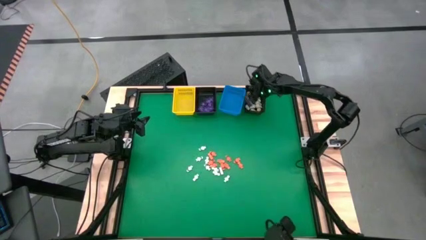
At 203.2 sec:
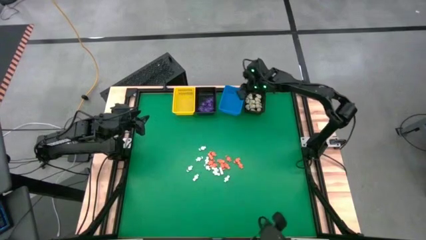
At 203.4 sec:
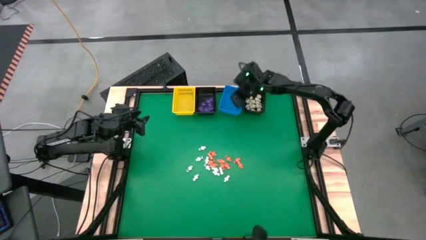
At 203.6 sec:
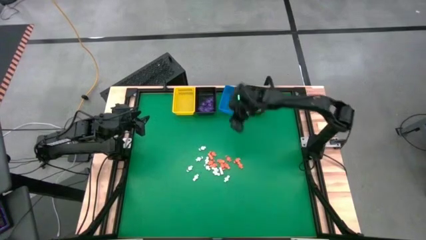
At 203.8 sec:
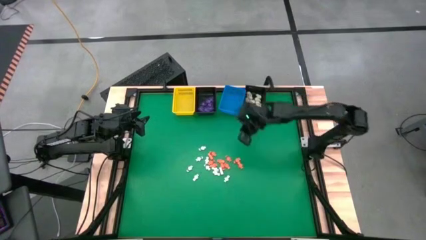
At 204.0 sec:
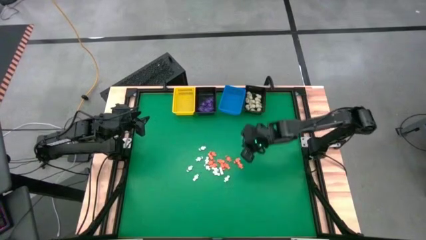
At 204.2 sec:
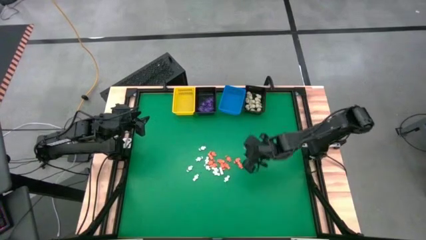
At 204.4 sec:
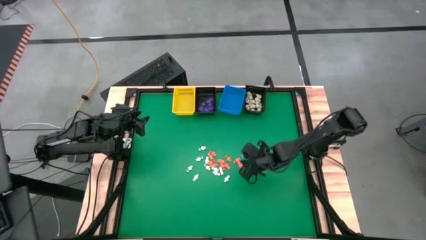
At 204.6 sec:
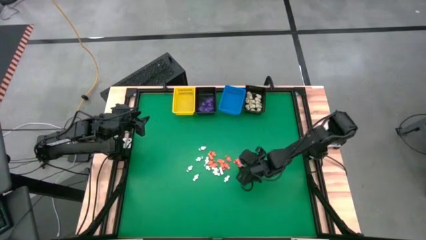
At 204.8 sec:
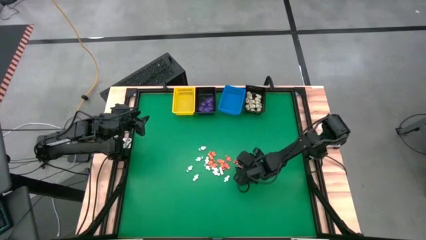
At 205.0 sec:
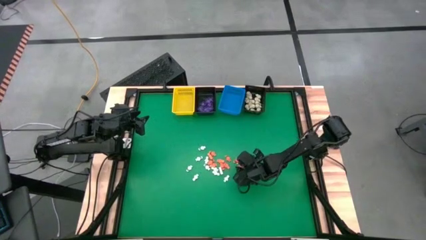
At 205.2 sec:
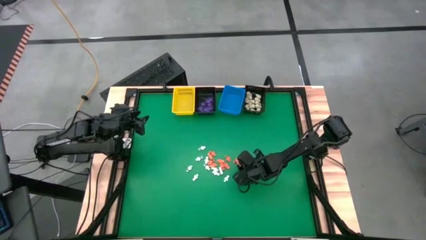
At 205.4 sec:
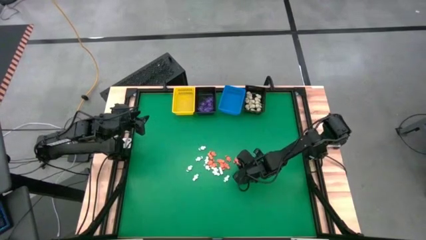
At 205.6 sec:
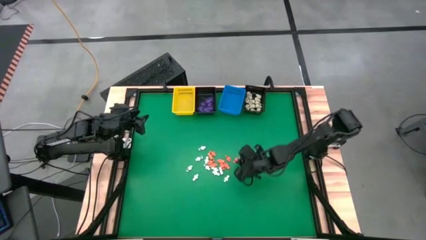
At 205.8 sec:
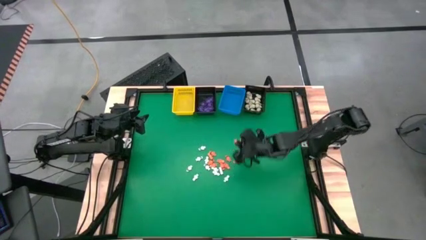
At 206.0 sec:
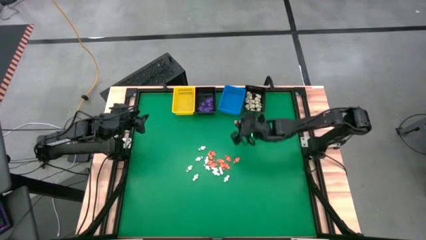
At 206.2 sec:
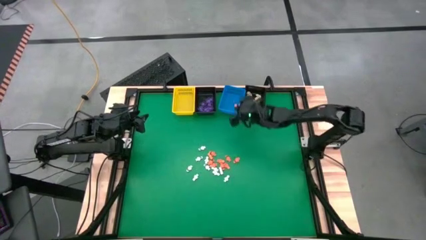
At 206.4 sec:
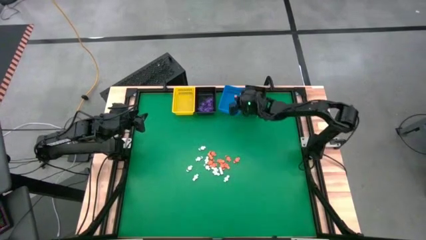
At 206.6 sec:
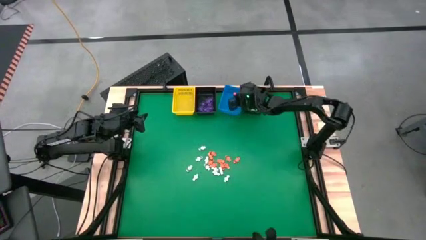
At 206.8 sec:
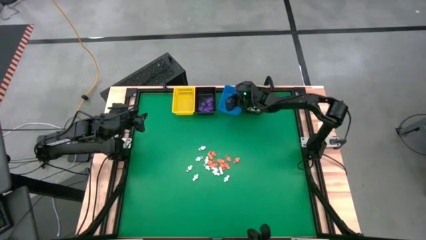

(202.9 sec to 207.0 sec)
Task: Sort Halloween decoration
Put the orange skeleton toy into the blue basket

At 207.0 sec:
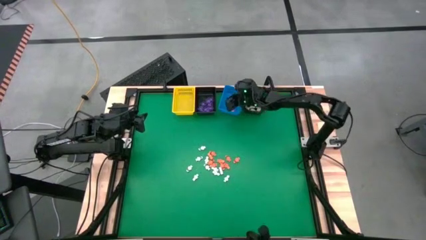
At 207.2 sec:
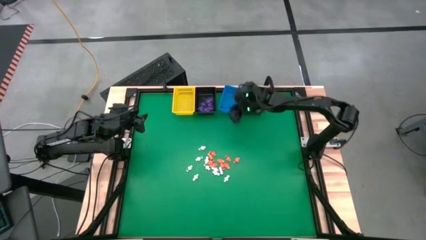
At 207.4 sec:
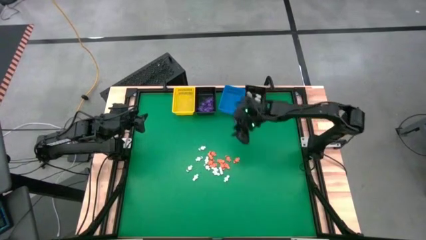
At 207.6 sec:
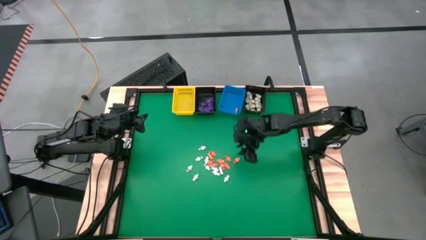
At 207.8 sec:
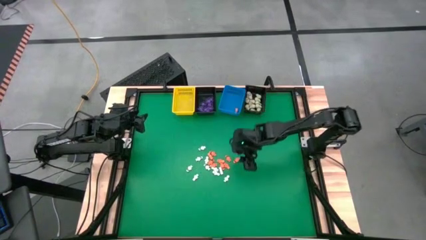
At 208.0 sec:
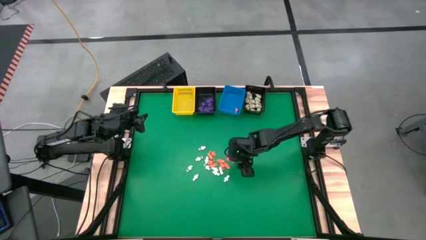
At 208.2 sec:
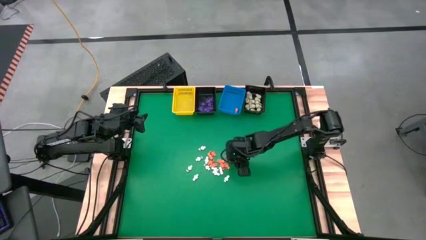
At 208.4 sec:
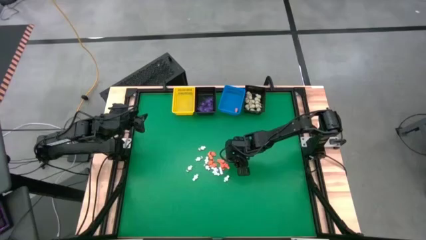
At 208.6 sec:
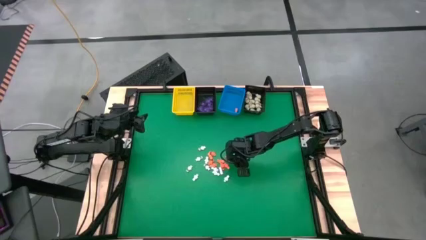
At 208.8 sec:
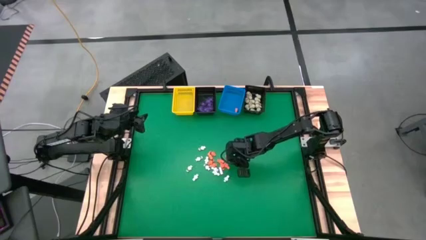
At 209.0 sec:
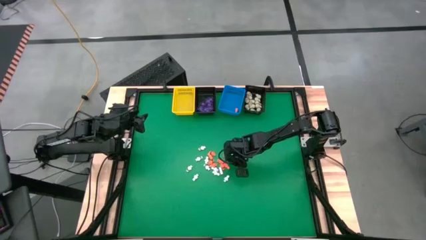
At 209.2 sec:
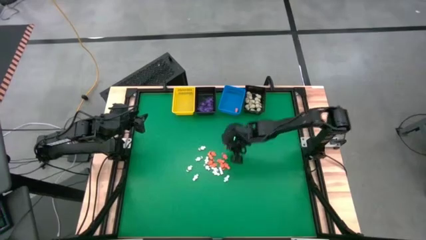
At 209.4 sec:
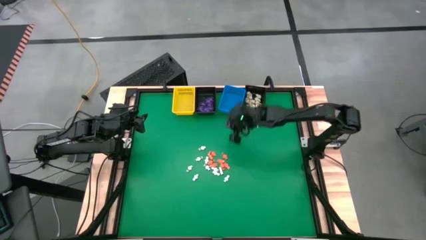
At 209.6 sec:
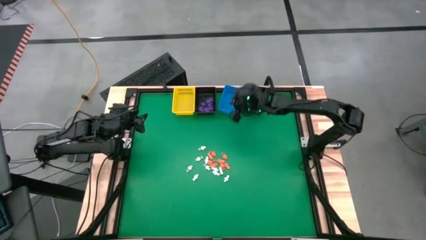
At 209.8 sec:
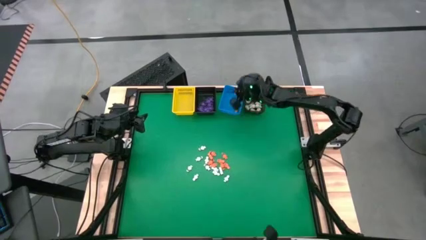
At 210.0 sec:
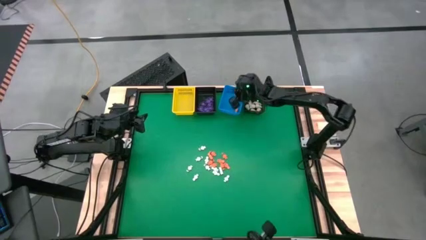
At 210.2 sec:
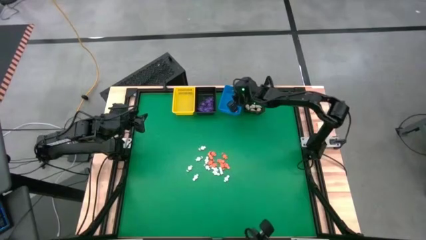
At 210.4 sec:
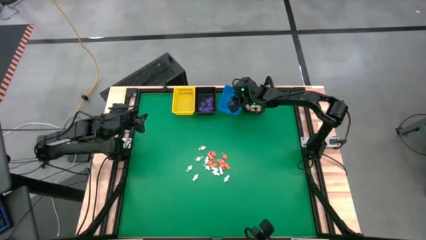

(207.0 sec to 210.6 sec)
Put the orange skeleton toy into the blue basket

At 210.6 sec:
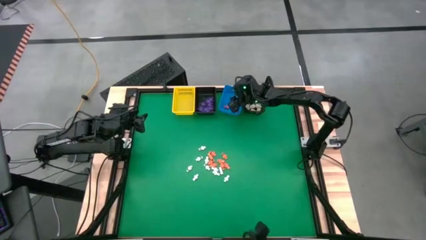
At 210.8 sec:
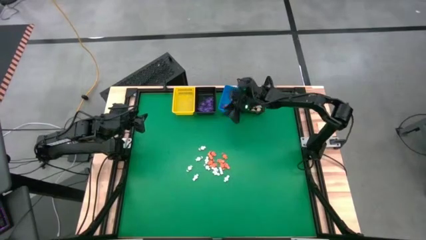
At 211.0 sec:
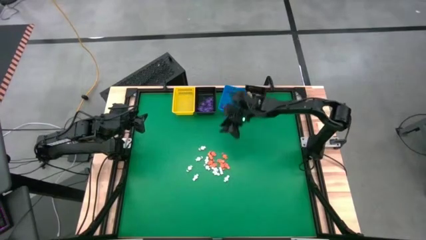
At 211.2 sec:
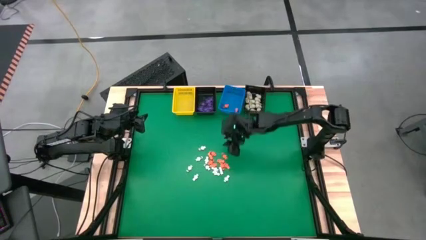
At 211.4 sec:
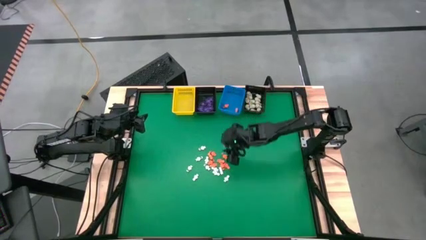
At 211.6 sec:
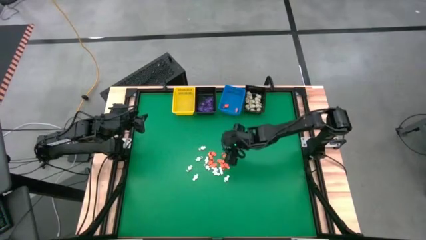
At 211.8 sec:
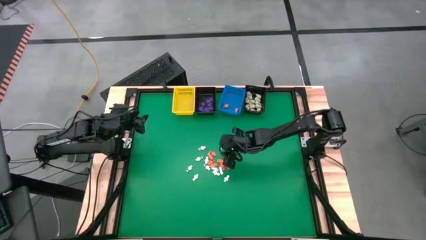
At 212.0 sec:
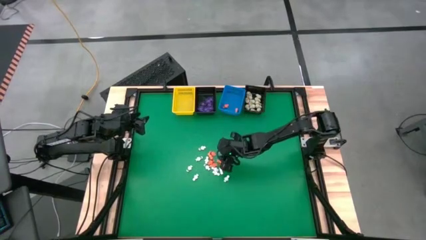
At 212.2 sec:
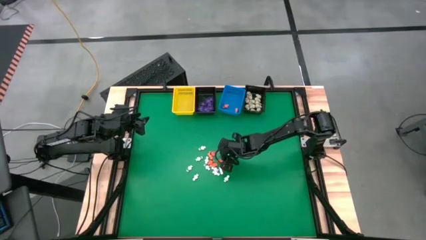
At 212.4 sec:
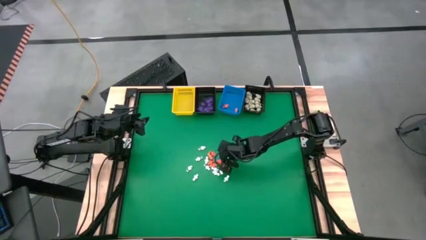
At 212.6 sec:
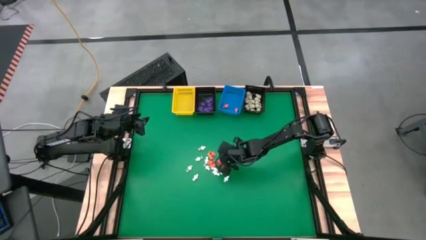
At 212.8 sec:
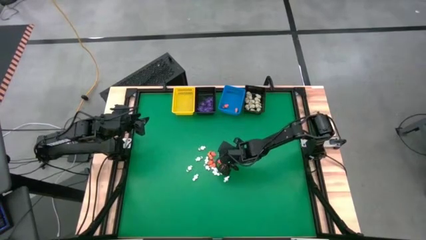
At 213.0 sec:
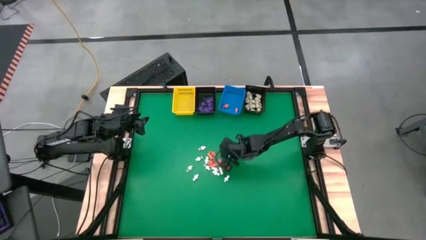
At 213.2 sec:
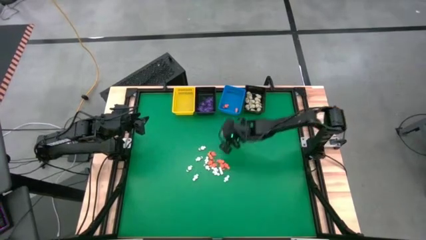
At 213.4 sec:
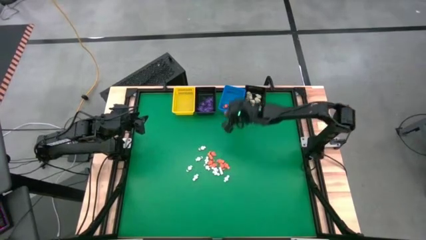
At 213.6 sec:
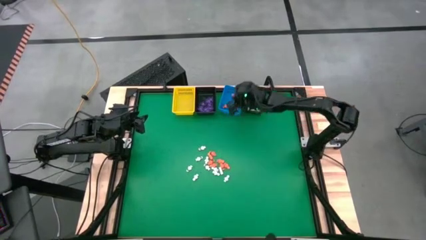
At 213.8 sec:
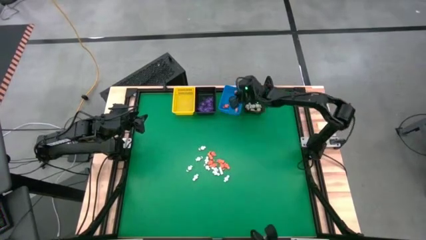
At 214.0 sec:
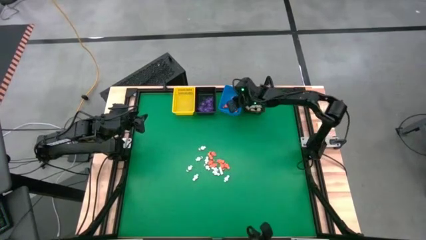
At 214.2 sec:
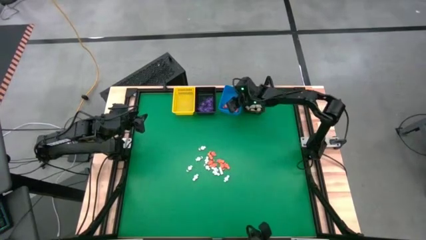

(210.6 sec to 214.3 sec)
Put the orange skeleton toy into the blue basket

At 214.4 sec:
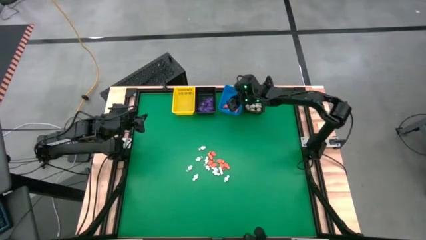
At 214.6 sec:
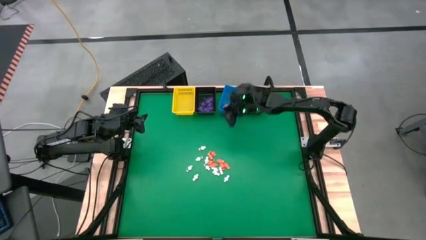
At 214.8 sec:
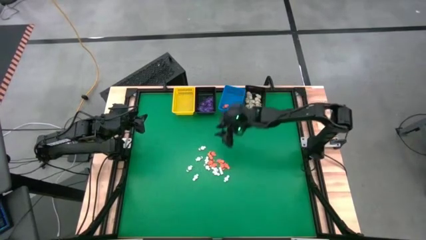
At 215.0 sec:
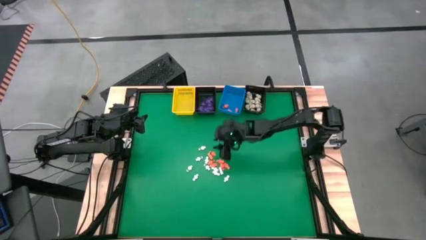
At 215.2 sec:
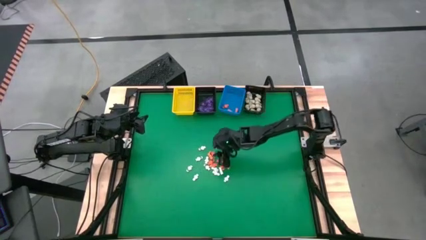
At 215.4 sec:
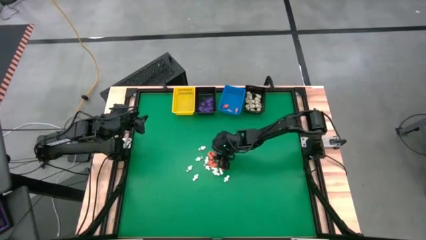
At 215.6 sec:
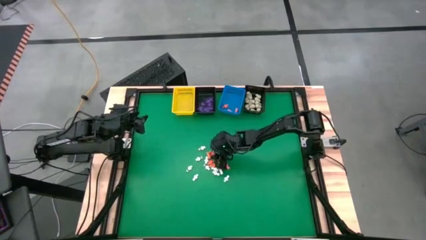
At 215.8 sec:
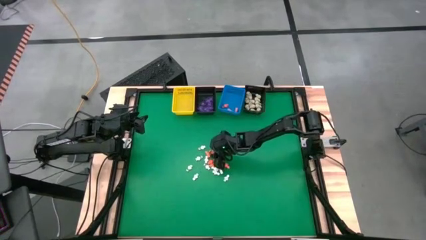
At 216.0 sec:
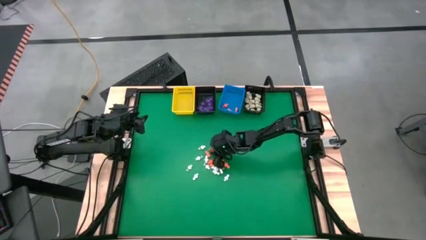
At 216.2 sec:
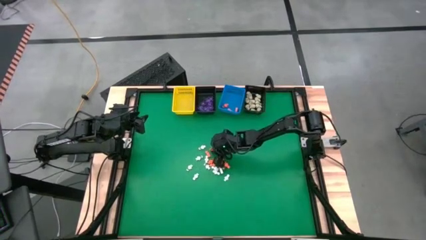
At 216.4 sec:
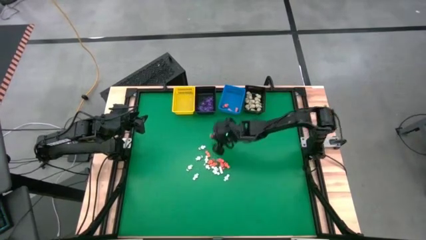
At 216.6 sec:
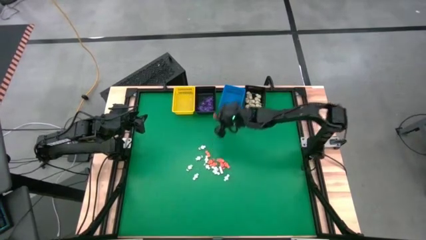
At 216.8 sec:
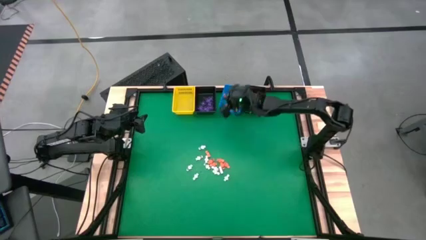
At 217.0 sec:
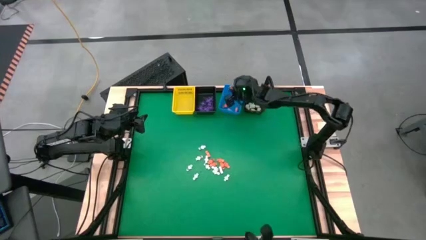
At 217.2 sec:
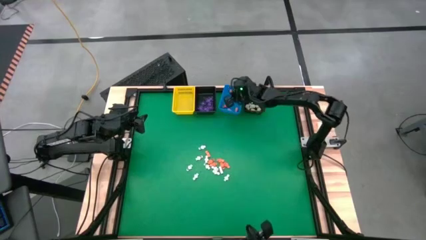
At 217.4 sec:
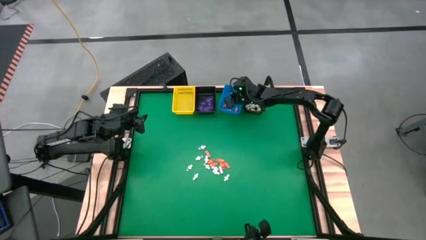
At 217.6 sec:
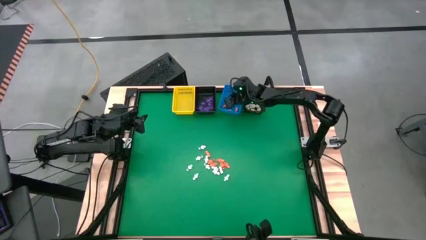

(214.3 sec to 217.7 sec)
Put the orange skeleton toy into the blue basket

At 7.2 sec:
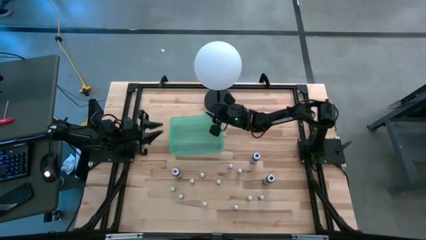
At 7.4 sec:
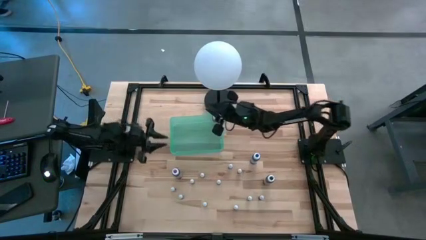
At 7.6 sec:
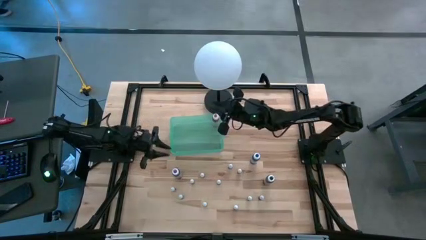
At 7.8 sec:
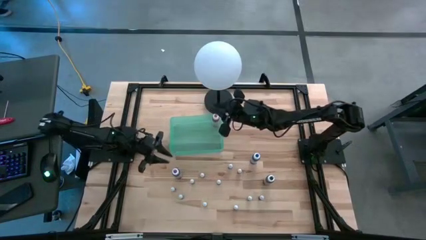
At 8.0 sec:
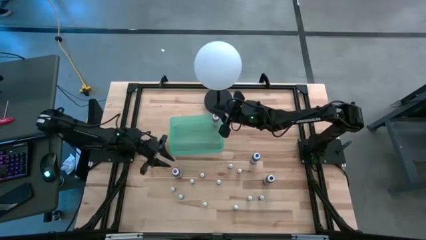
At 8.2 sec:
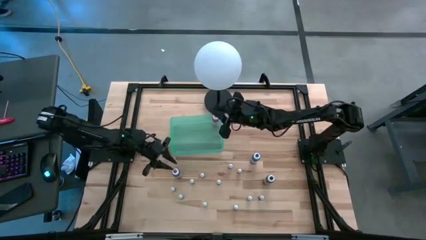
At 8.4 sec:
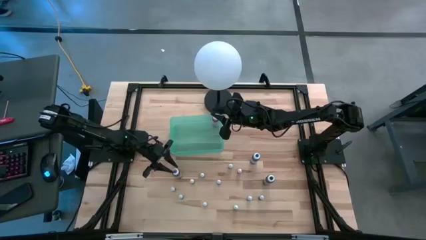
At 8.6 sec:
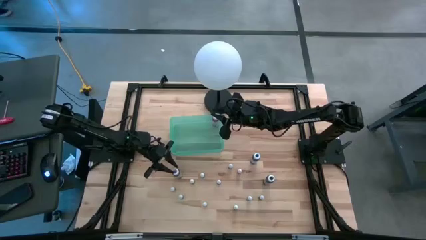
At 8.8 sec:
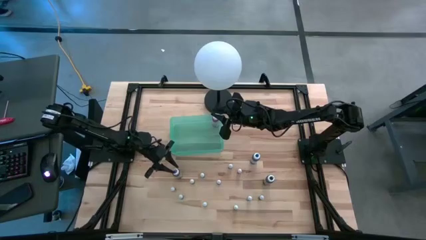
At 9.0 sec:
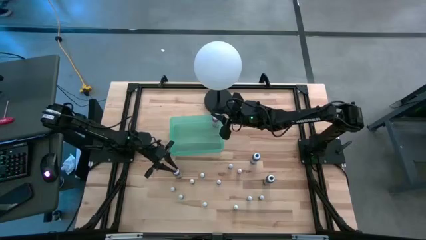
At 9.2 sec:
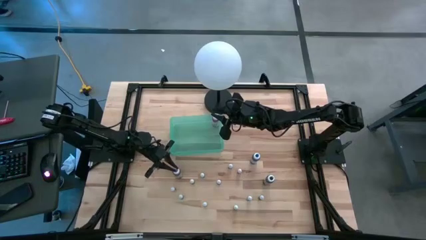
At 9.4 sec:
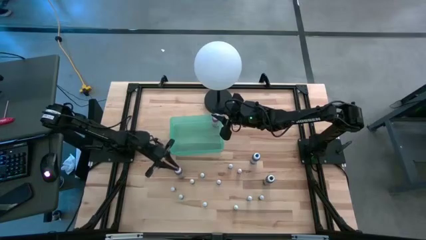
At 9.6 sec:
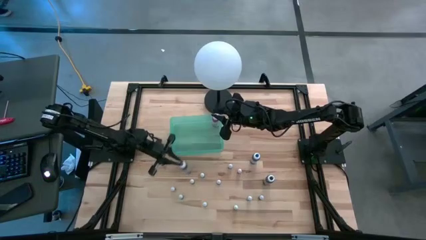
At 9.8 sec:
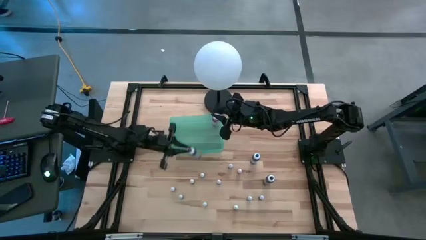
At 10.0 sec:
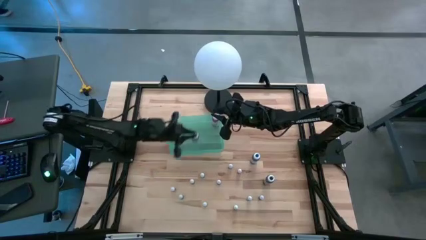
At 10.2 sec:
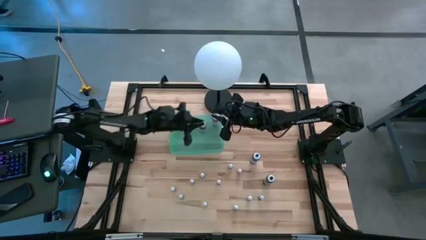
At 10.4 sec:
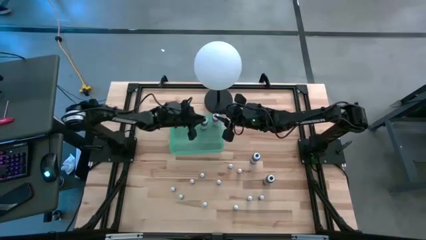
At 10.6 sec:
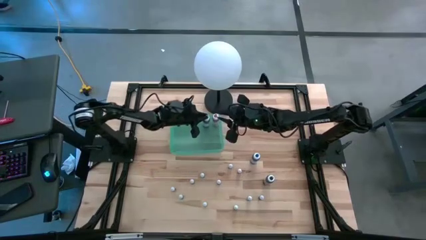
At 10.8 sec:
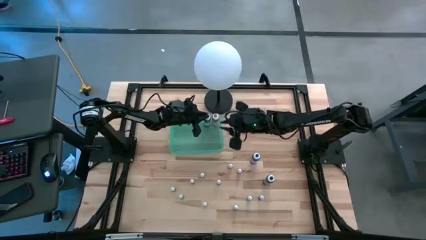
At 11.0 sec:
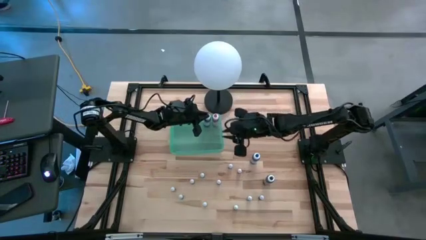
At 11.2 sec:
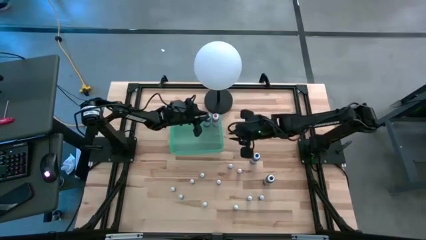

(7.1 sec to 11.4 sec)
Task: Pick & Place food coloring
Put the big purple food coloring bottle into the green bin
